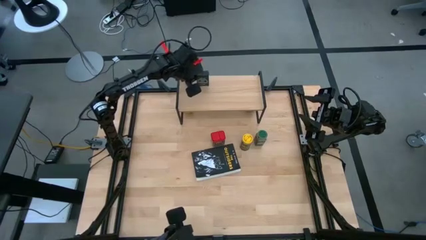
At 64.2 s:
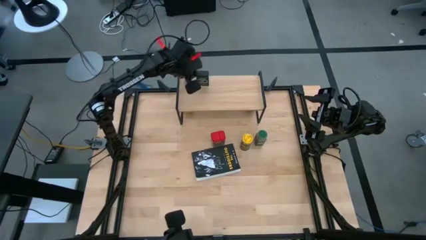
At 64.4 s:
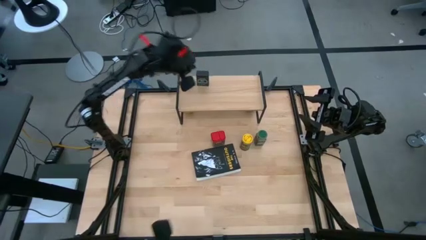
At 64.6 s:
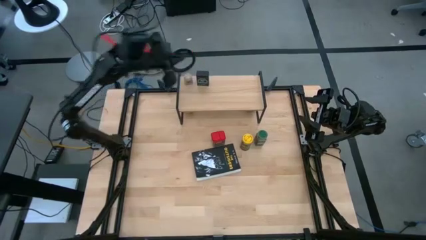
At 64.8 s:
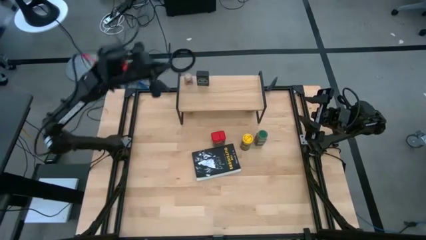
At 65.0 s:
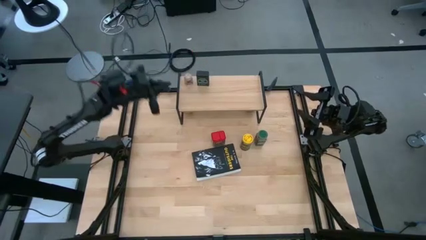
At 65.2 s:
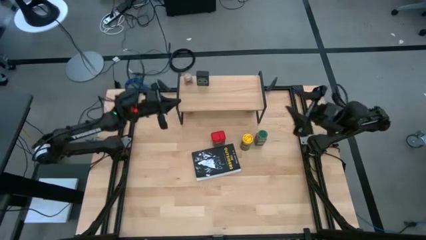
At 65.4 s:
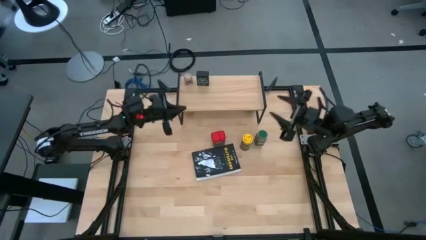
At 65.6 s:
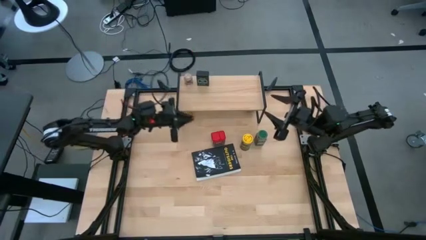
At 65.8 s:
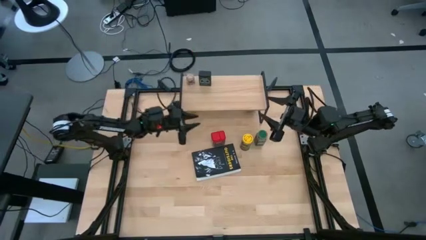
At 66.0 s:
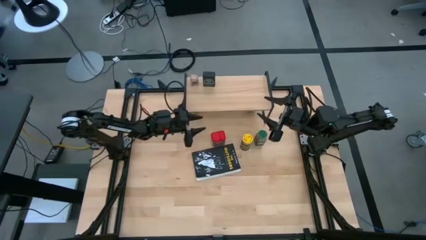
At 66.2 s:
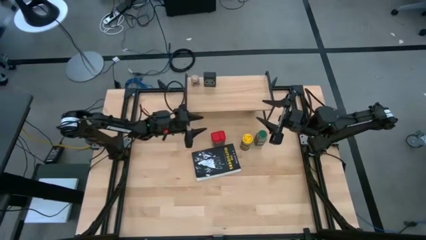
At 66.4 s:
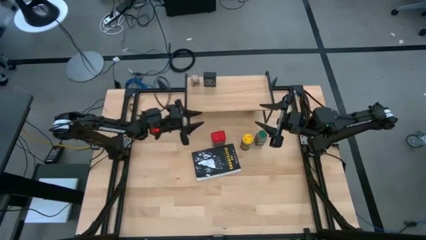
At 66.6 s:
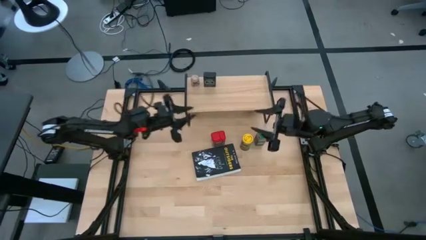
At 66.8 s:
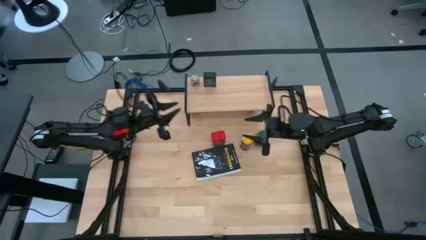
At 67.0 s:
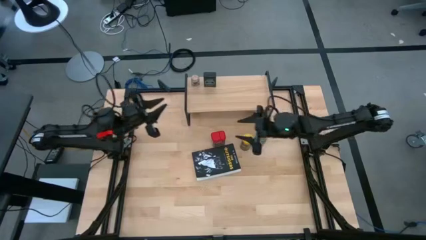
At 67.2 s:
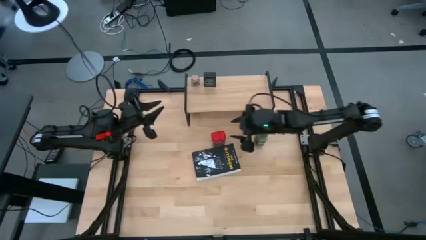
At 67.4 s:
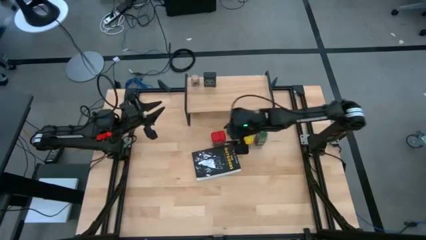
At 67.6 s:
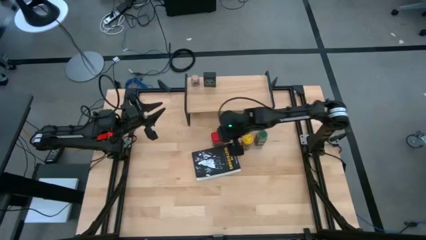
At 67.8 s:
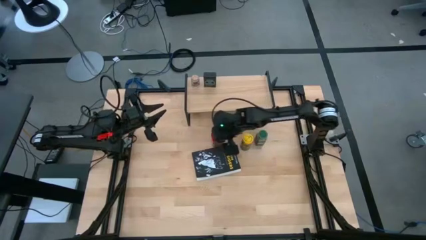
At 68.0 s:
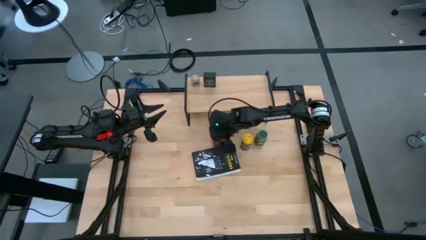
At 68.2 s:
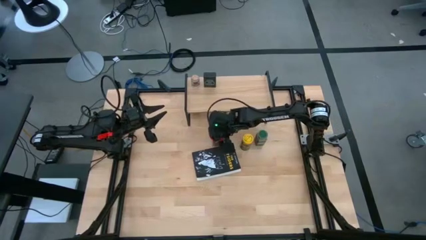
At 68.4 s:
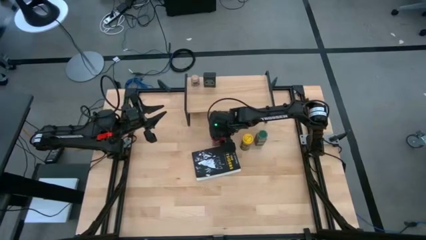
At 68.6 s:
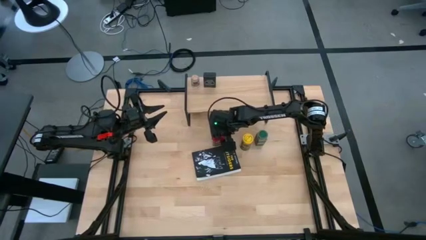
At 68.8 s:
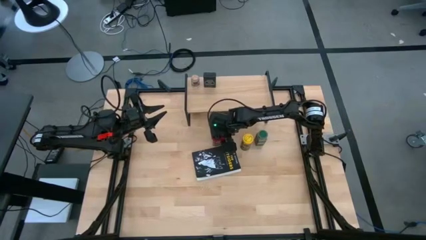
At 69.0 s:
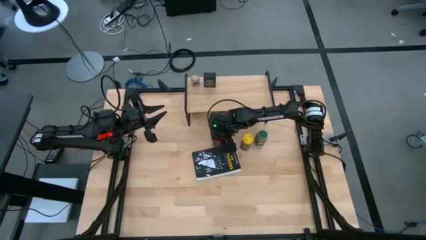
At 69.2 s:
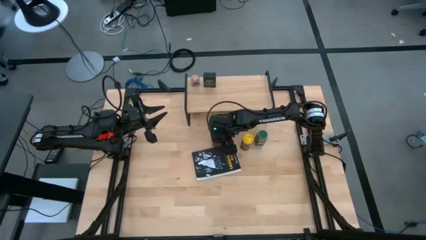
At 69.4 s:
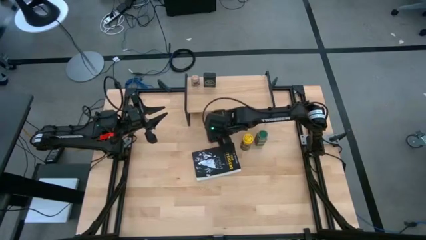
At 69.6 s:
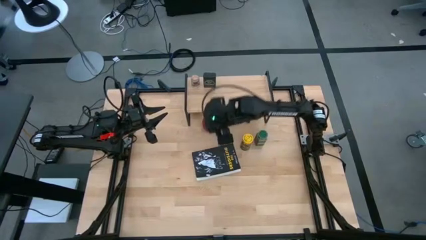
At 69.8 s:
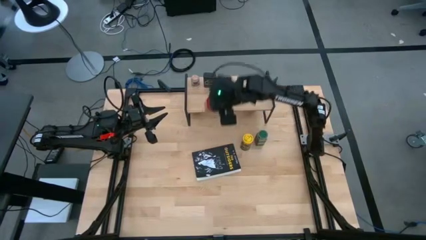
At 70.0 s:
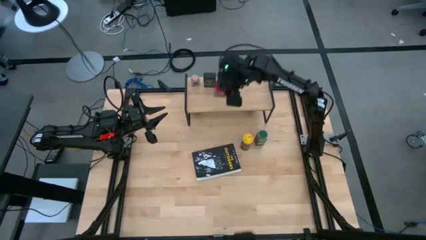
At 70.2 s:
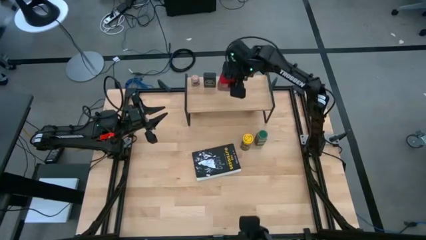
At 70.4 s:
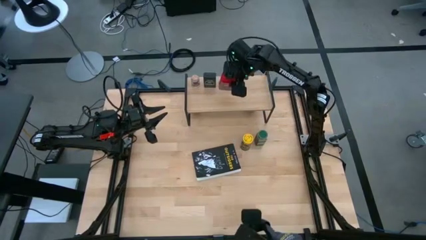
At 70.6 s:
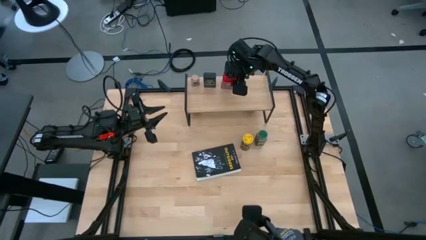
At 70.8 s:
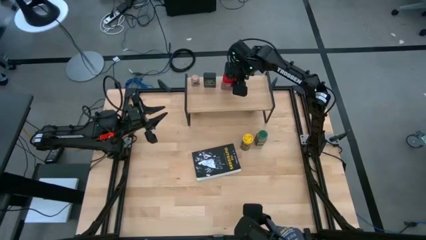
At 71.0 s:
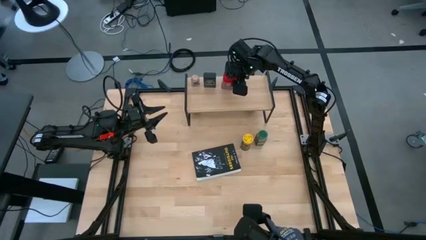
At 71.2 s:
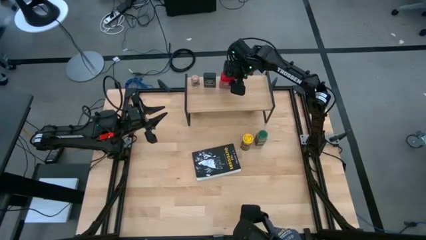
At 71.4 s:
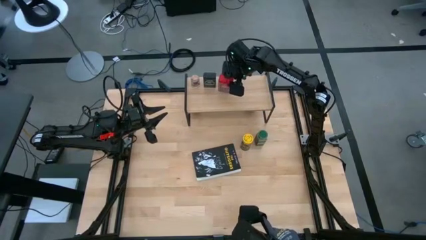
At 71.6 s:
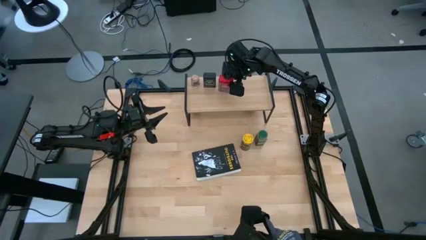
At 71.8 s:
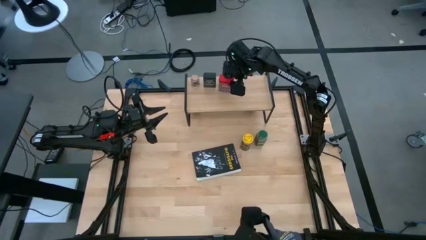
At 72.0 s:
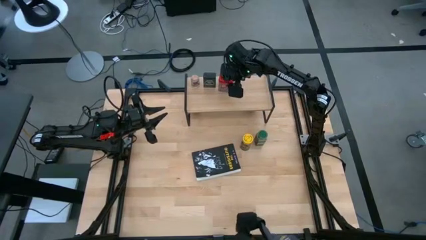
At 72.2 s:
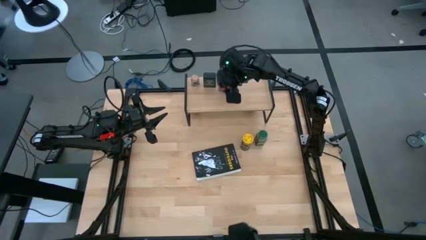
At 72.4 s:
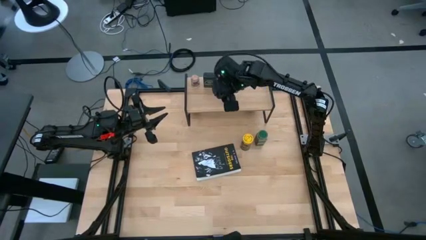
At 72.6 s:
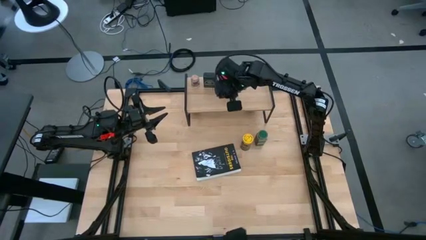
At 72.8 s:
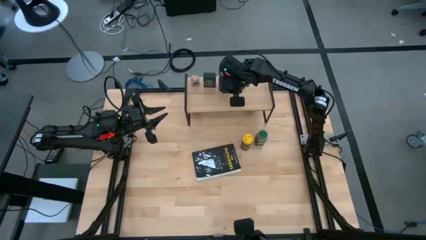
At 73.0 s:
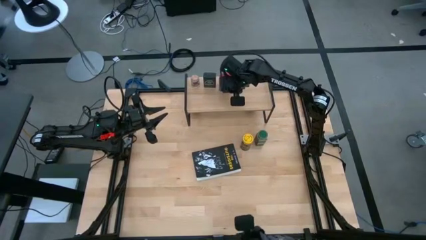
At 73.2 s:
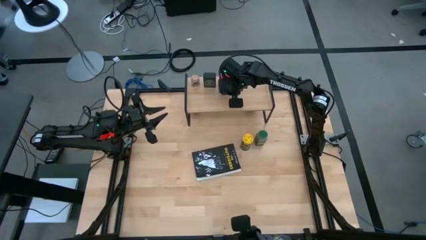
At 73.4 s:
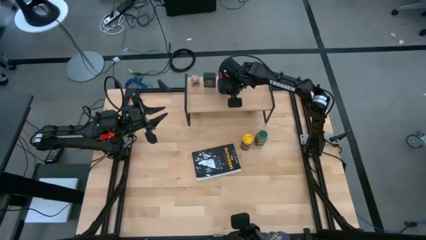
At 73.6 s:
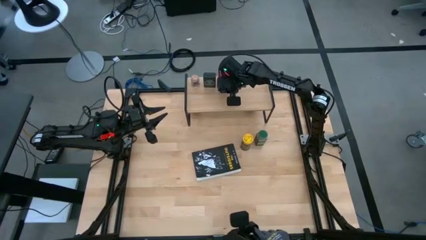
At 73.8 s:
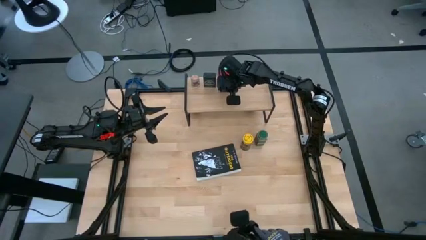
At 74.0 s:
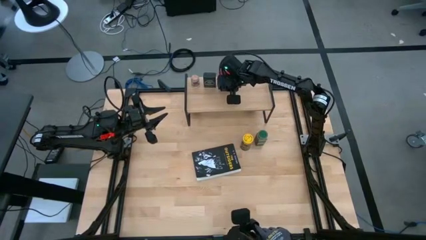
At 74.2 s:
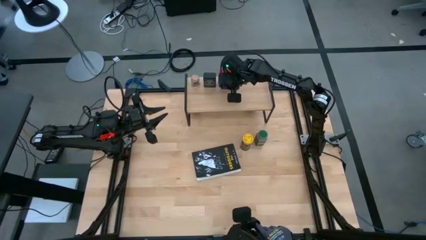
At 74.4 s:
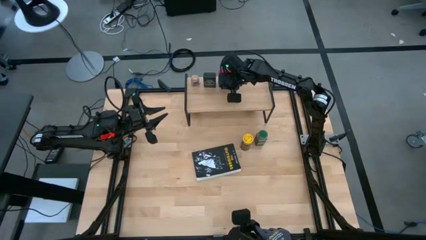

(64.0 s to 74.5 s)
Task: Shelf spices
Put the red seasoning on the shelf
